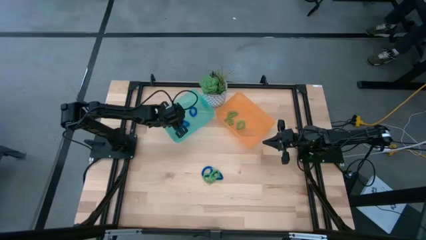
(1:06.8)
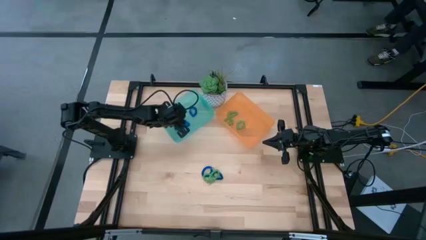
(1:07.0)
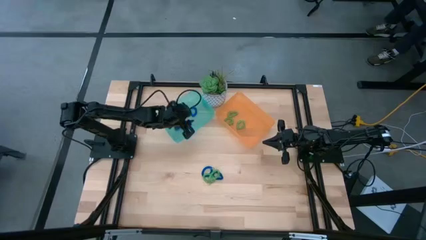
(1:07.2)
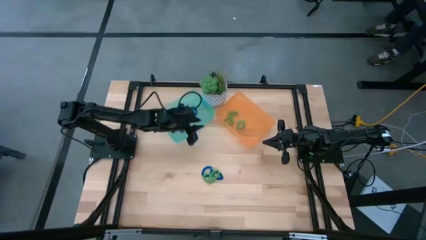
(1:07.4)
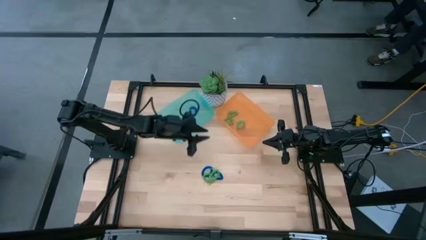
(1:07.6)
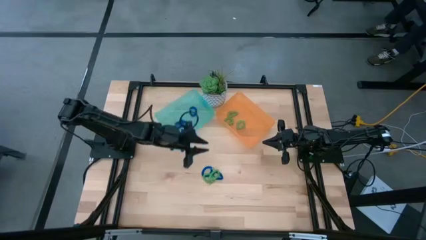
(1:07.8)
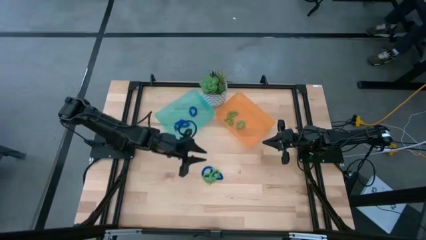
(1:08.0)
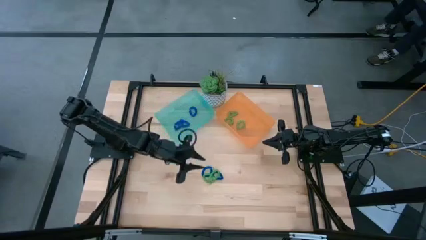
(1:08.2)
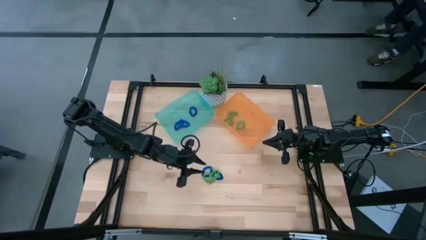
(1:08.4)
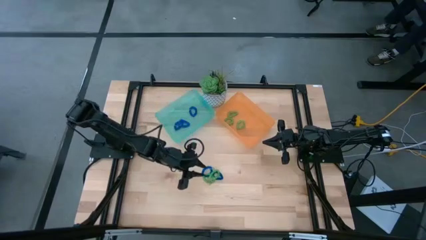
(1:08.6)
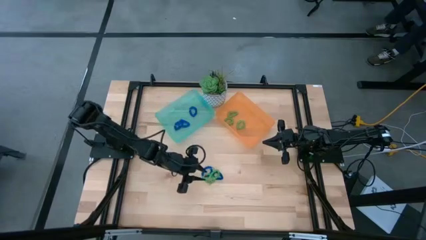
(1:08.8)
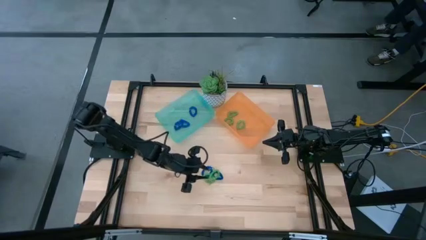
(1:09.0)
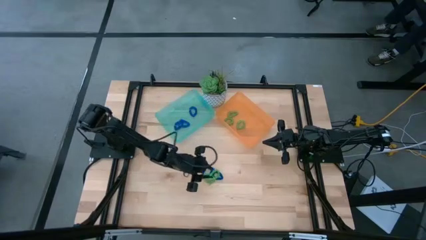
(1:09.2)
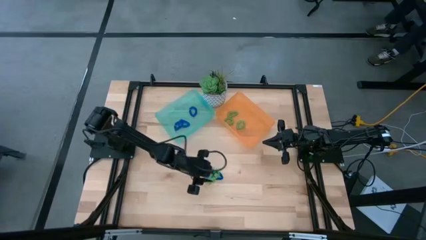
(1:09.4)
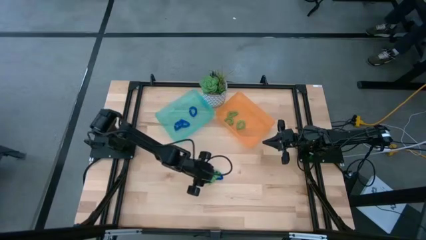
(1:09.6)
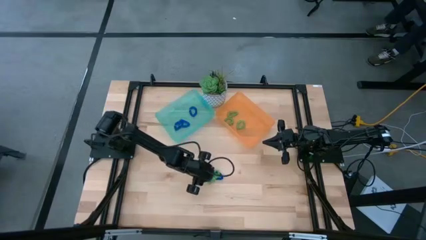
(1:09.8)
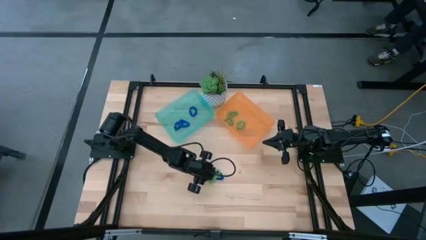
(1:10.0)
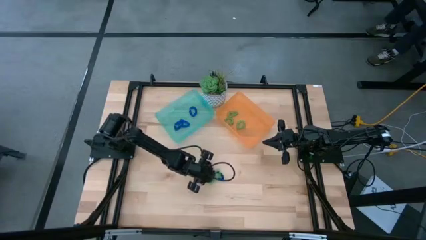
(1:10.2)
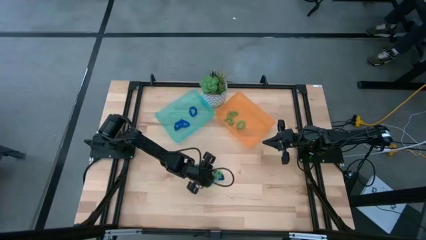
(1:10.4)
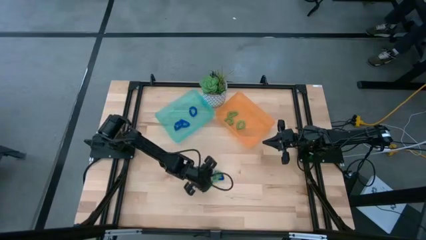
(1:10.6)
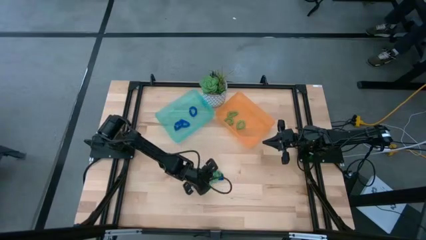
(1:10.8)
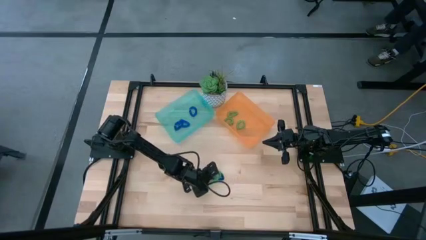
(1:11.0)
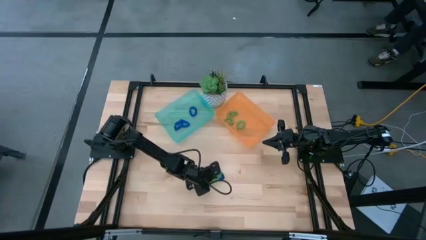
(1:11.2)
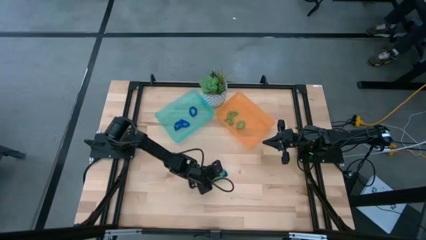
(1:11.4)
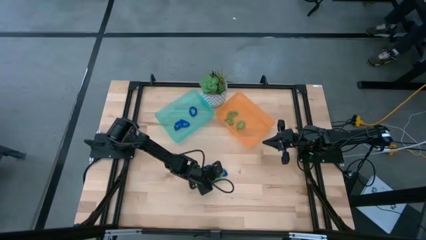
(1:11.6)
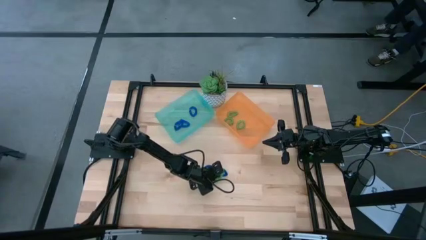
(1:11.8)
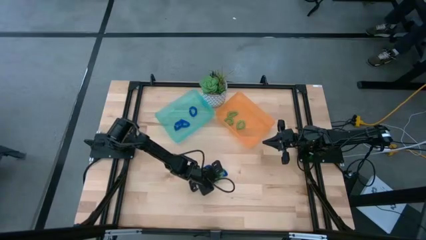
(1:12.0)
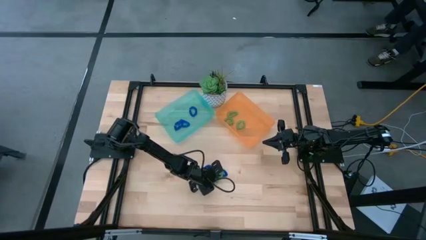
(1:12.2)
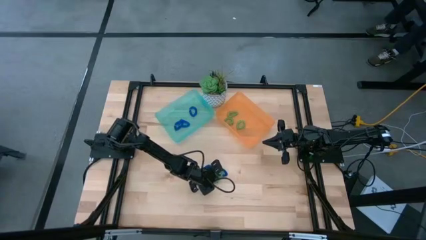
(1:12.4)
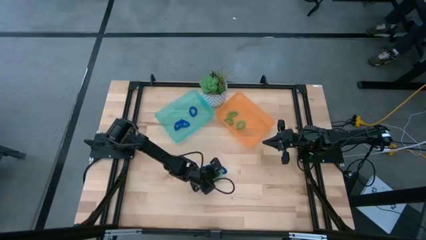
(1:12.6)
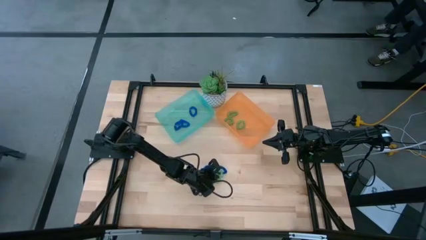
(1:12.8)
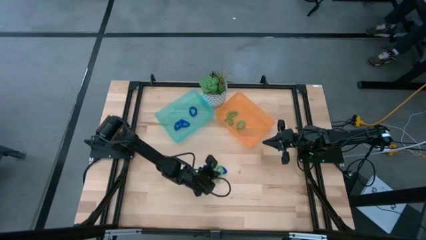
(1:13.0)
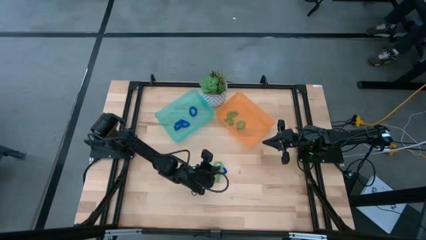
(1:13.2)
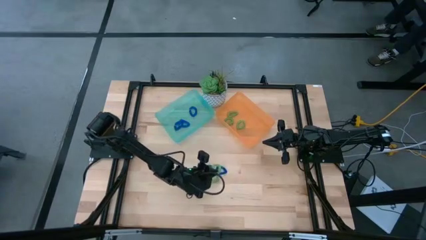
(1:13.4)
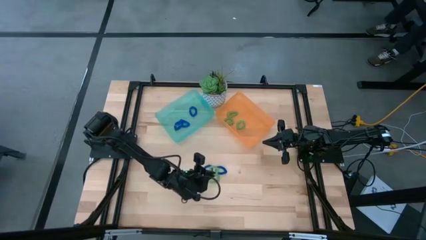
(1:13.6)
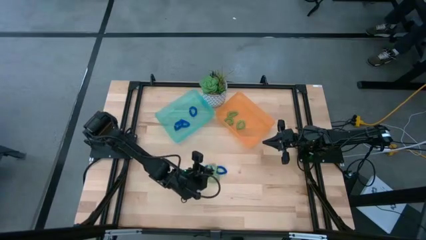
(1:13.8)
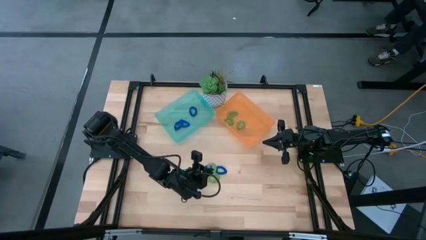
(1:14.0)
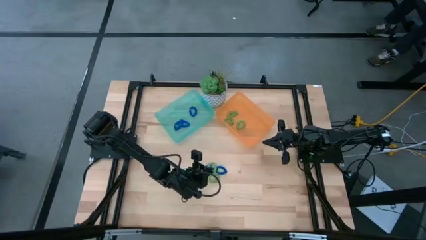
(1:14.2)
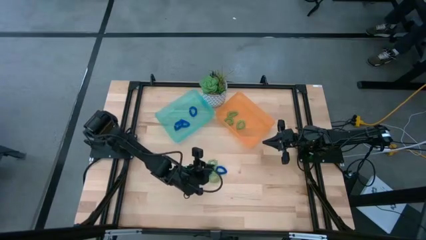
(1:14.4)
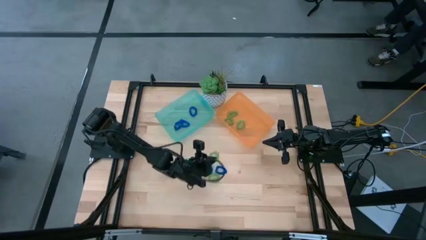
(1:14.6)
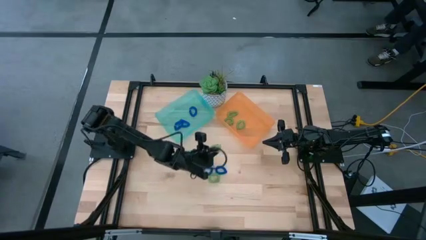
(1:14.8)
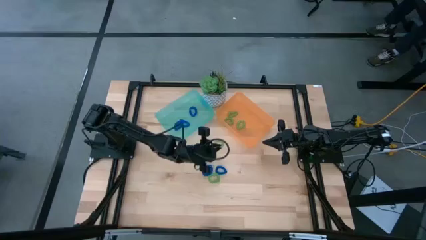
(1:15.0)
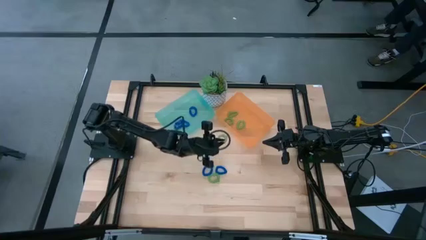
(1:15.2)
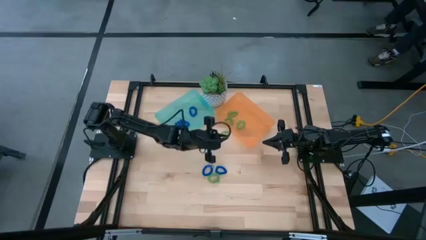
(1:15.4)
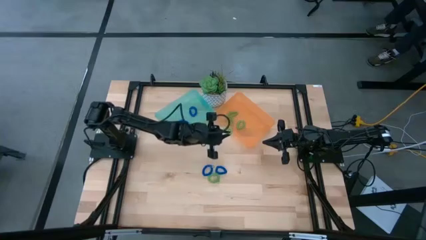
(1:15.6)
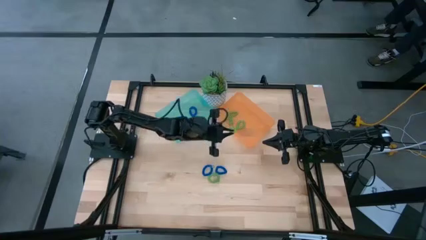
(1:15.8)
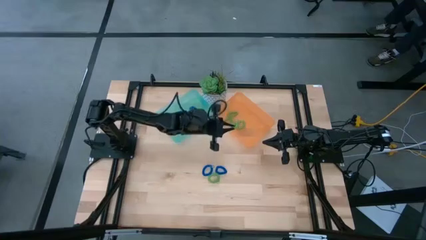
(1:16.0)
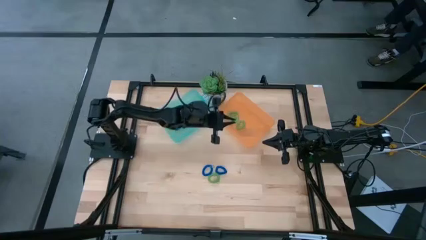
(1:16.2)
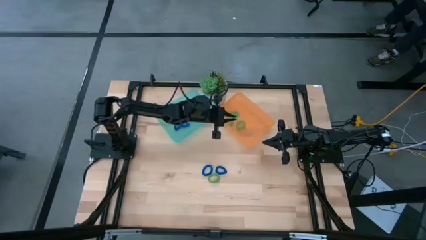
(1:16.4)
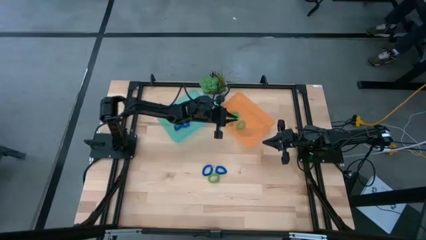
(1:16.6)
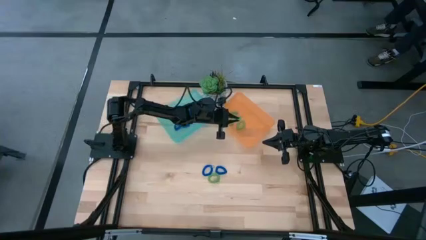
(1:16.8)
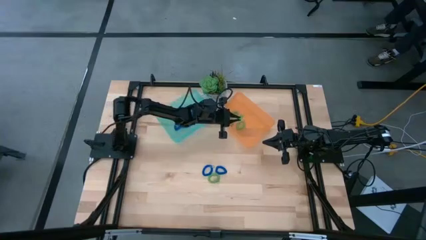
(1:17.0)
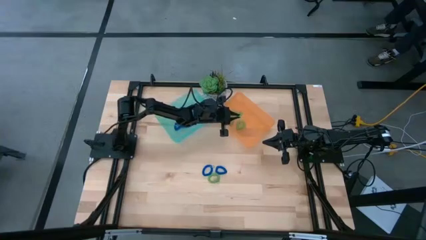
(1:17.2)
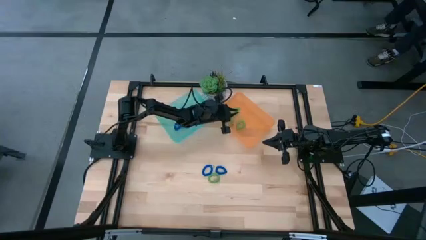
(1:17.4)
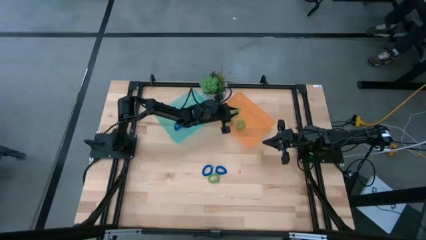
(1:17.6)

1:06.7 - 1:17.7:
Task: Sort spring keychains
Put the green spring keychain into the orange bin

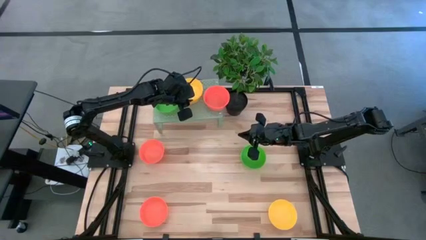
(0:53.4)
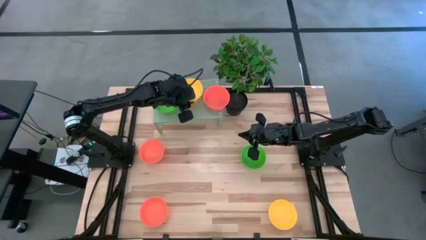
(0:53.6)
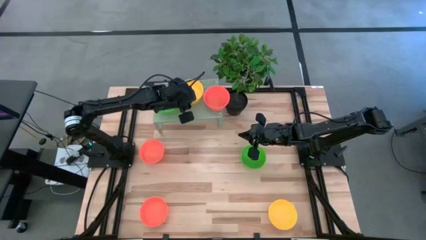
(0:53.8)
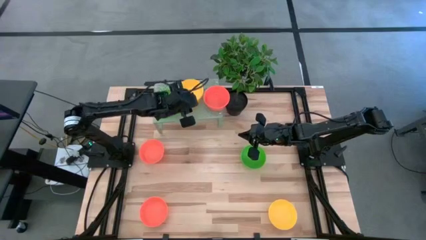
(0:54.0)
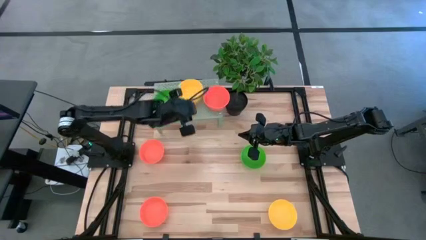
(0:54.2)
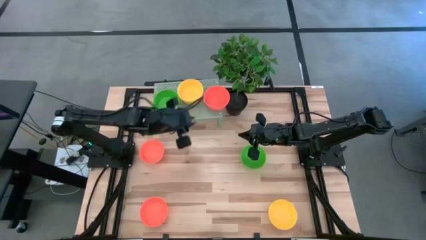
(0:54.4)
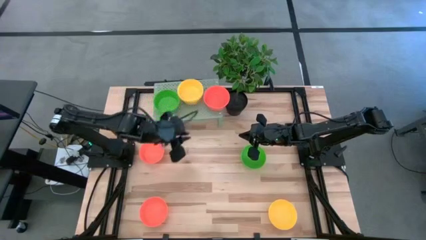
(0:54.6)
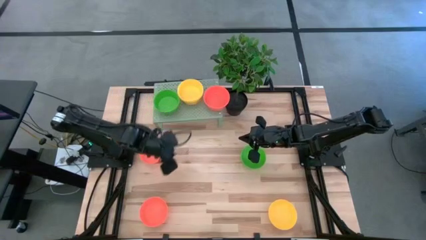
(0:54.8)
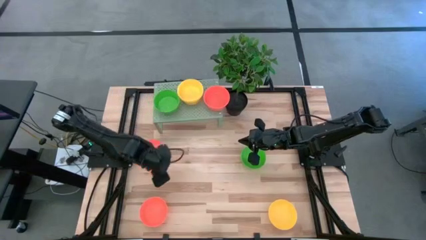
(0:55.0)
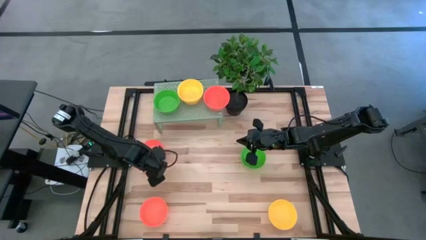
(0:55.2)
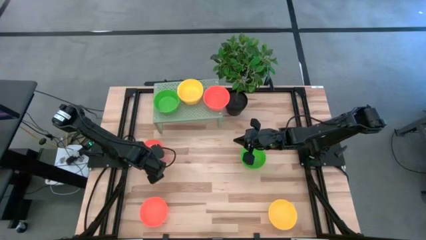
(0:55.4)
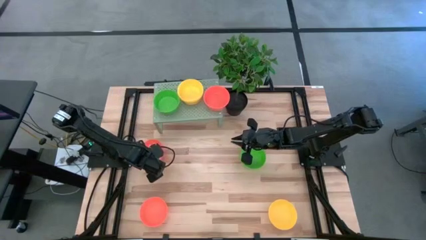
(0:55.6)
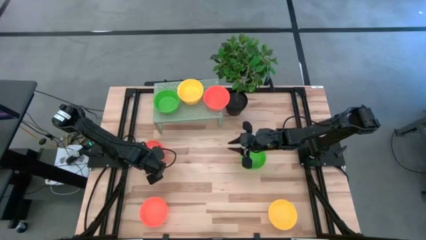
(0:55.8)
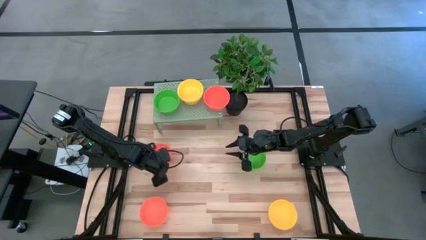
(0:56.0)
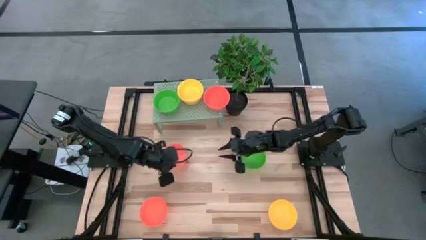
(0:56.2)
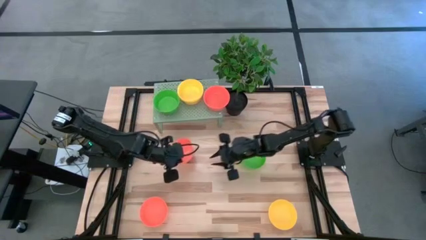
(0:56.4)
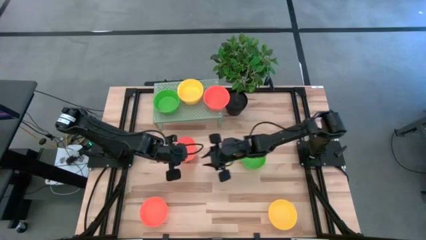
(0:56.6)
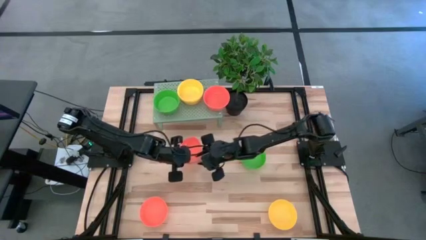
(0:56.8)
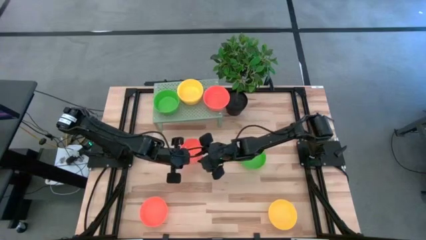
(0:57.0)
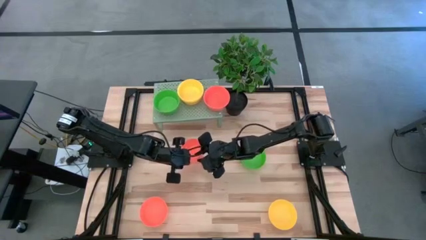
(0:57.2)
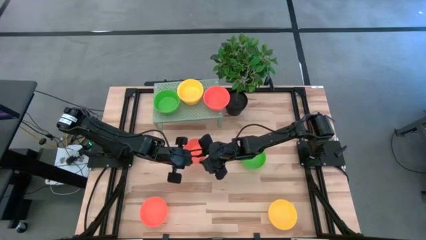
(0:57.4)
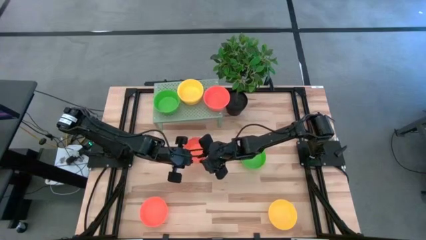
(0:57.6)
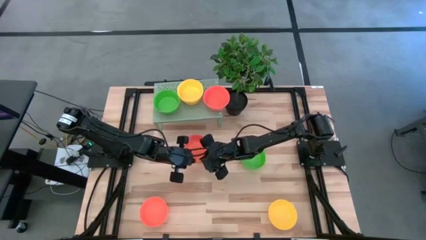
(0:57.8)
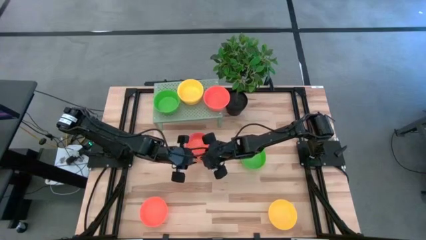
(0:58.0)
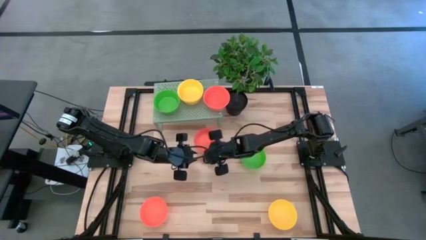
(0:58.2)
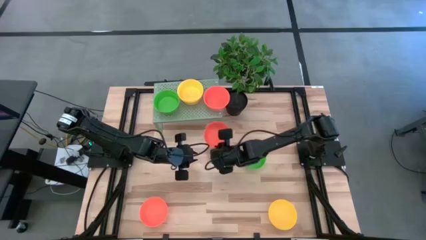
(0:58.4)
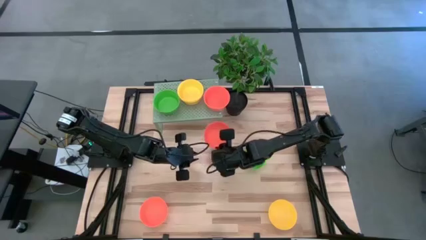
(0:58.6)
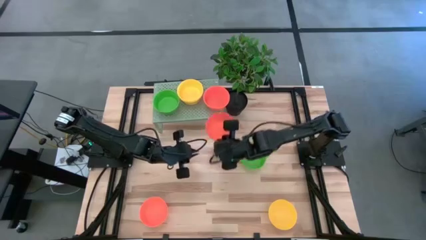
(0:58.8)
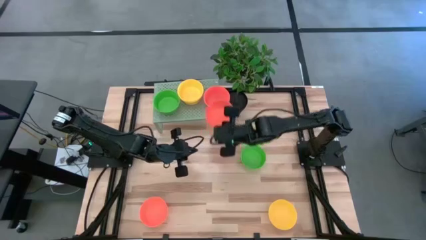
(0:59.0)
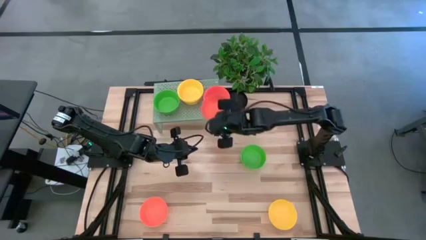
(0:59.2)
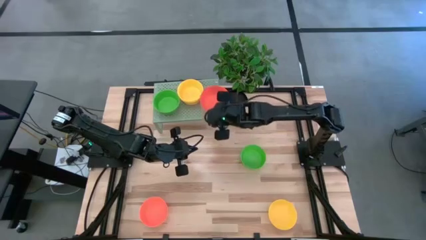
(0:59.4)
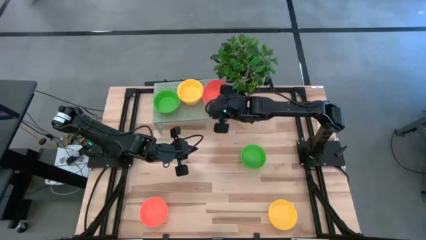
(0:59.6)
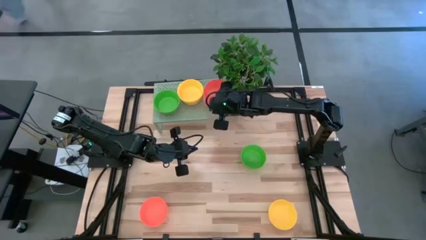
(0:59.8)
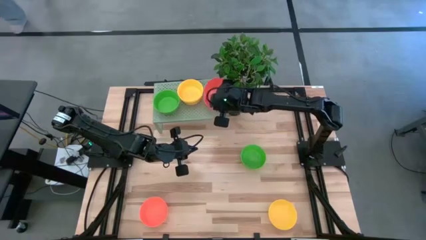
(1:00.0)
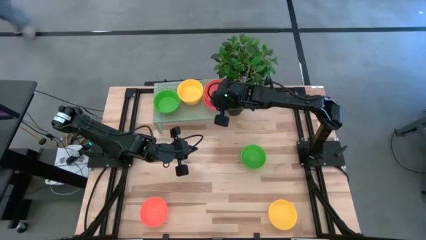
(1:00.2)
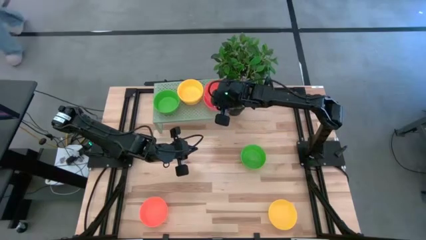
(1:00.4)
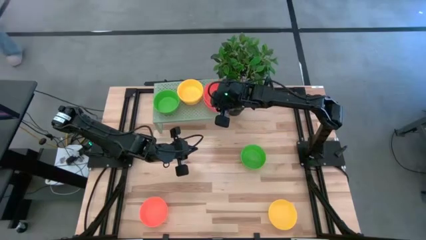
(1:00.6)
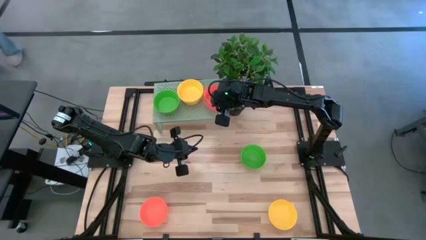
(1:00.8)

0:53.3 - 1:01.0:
Task: Pick & Place Mini bowls
Stack the orange bowl on top of the orange bowl on the shelf
